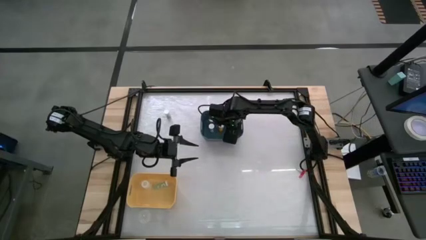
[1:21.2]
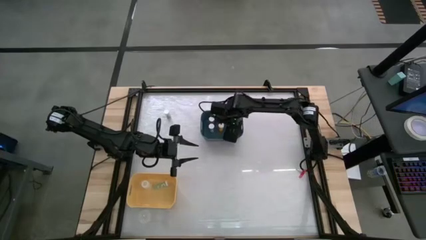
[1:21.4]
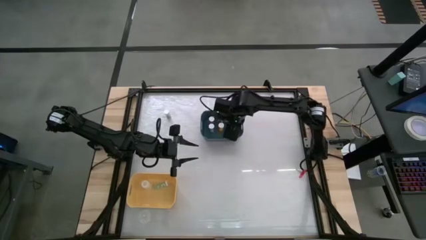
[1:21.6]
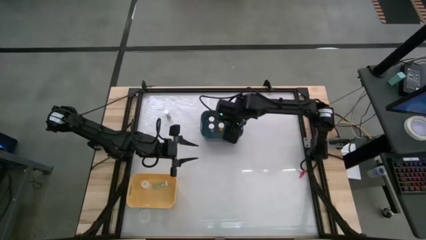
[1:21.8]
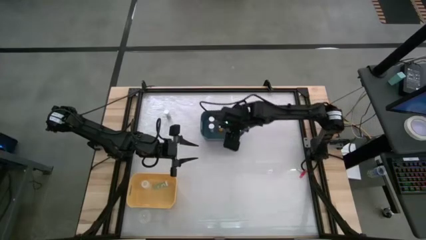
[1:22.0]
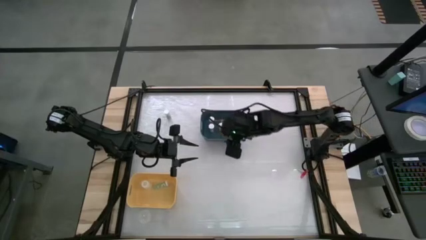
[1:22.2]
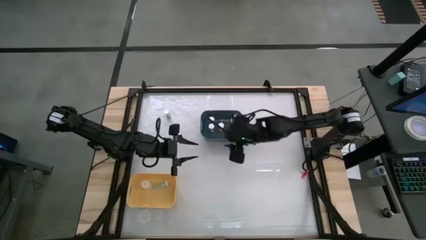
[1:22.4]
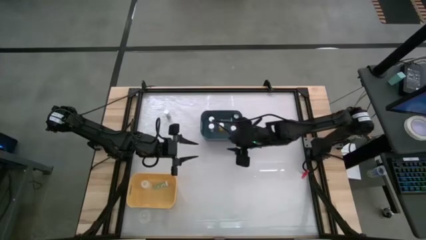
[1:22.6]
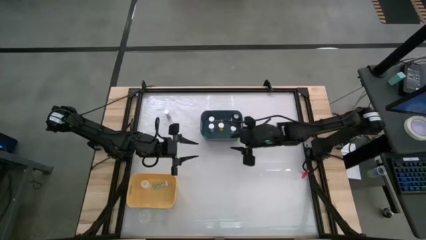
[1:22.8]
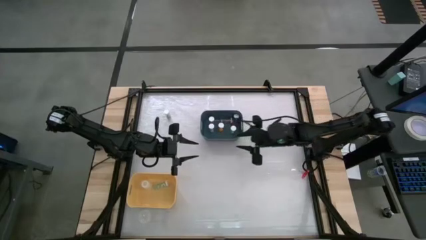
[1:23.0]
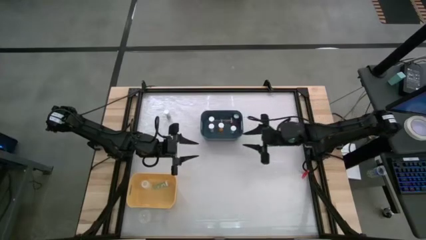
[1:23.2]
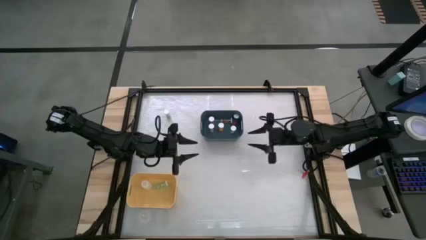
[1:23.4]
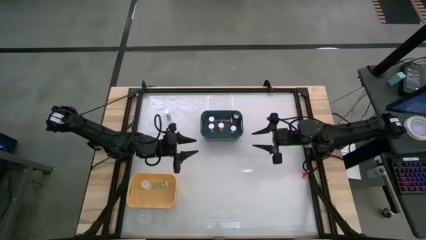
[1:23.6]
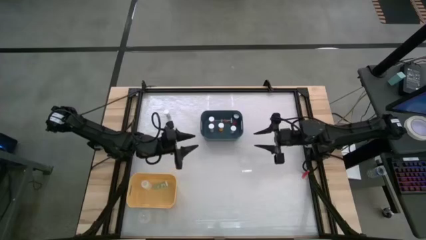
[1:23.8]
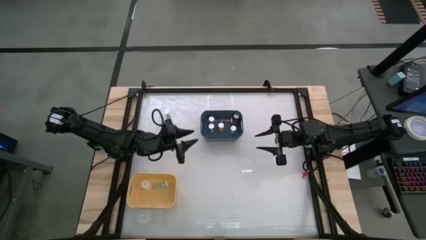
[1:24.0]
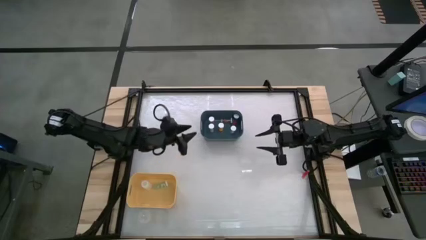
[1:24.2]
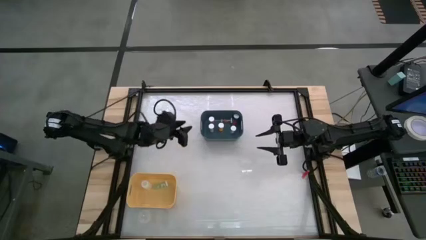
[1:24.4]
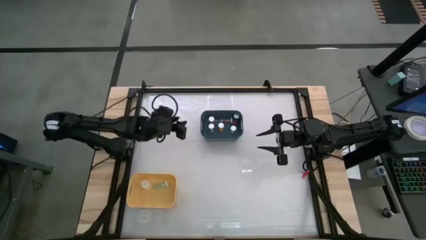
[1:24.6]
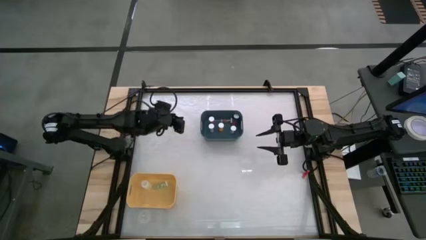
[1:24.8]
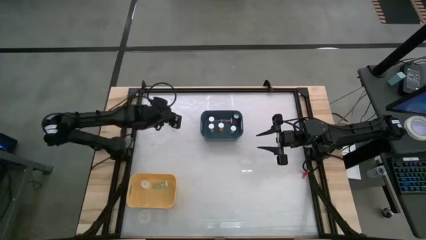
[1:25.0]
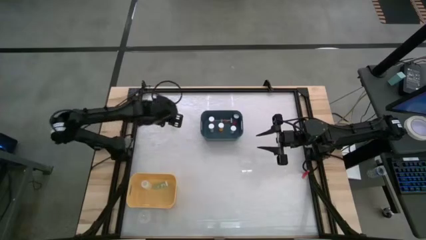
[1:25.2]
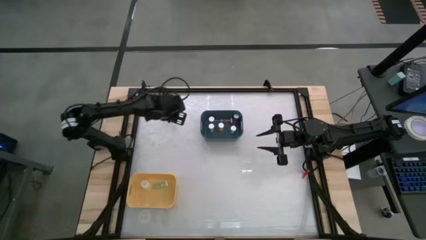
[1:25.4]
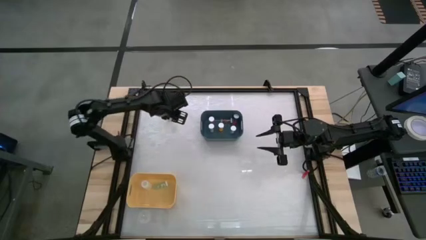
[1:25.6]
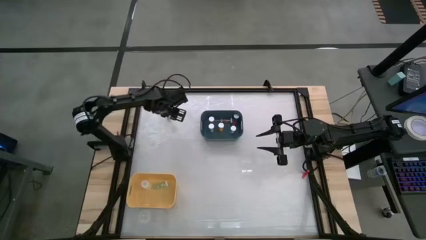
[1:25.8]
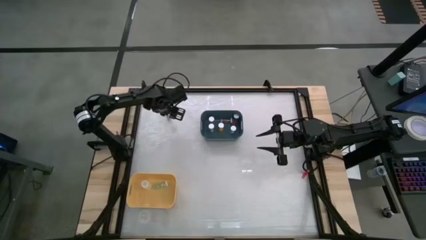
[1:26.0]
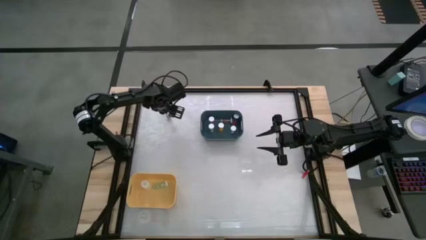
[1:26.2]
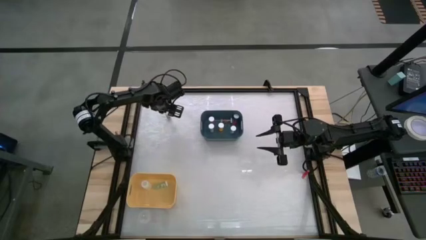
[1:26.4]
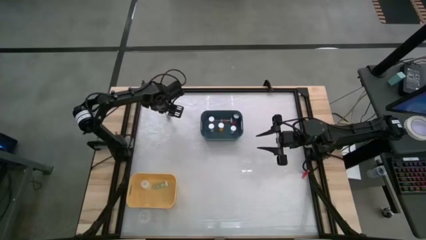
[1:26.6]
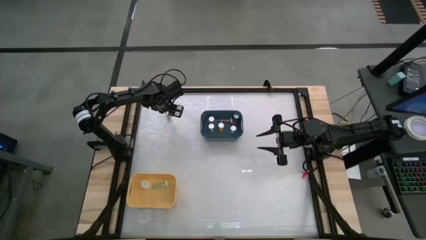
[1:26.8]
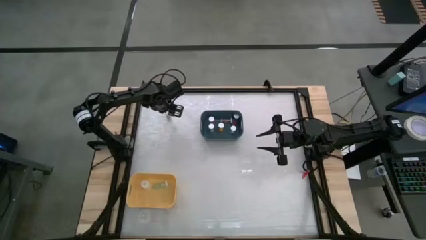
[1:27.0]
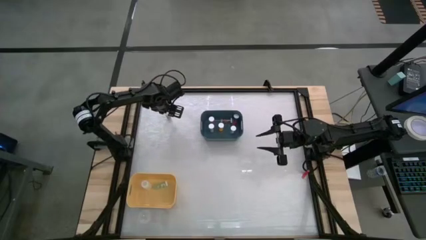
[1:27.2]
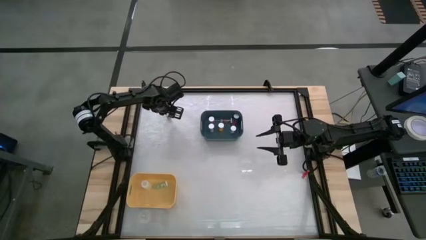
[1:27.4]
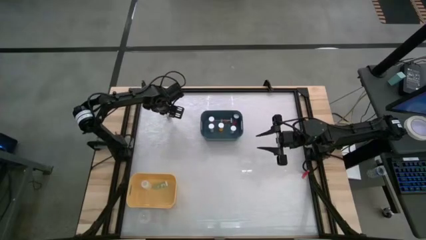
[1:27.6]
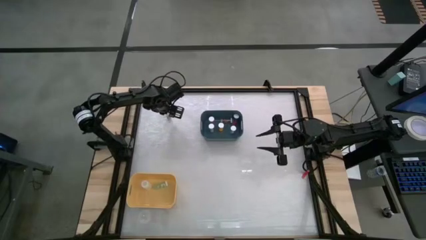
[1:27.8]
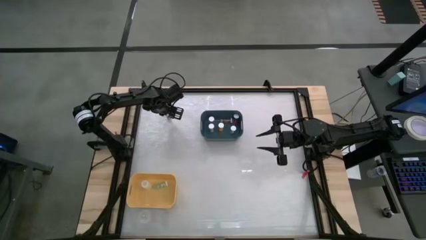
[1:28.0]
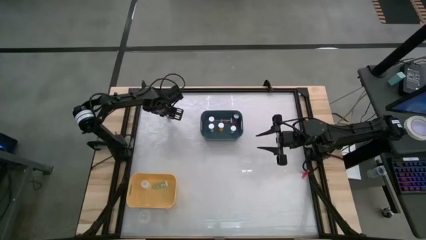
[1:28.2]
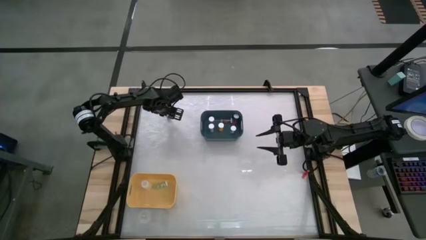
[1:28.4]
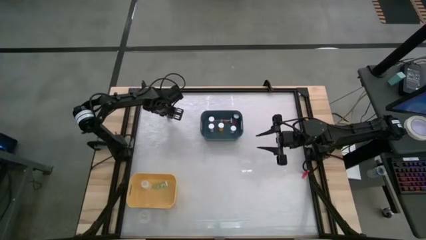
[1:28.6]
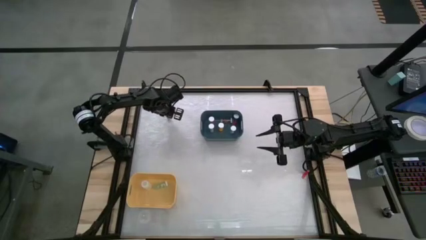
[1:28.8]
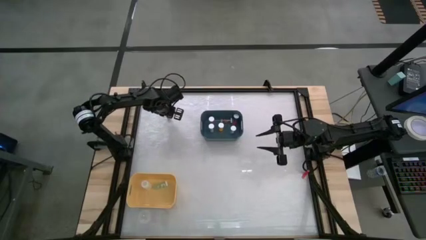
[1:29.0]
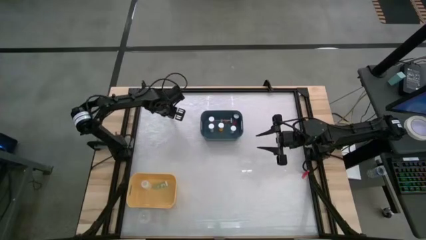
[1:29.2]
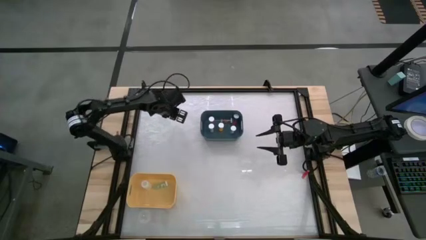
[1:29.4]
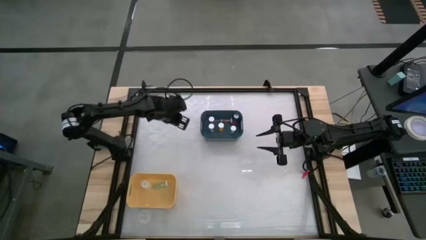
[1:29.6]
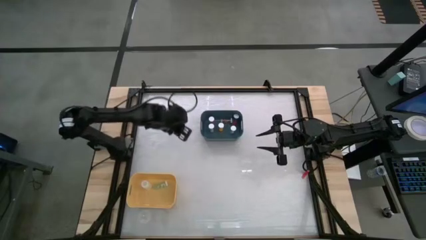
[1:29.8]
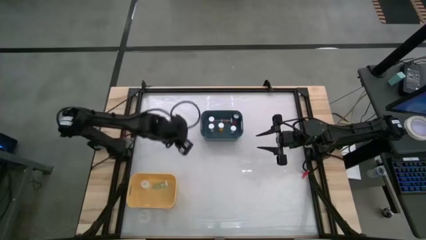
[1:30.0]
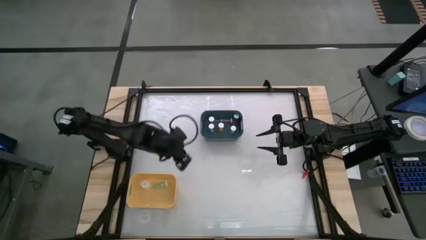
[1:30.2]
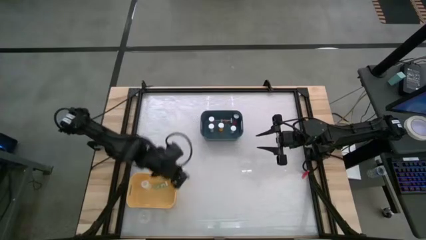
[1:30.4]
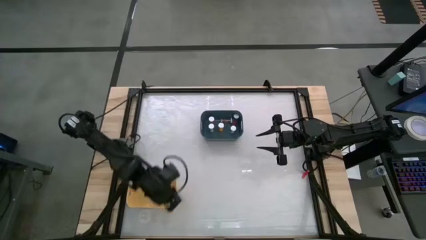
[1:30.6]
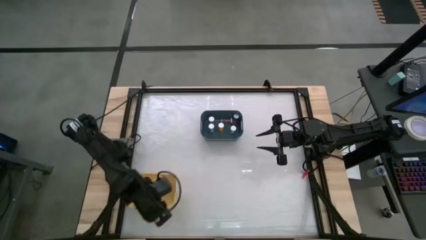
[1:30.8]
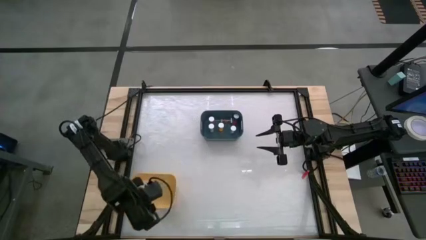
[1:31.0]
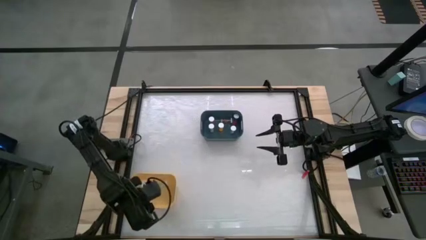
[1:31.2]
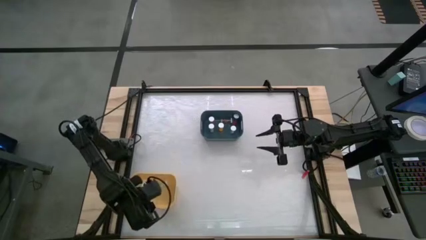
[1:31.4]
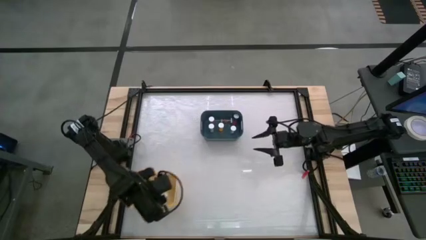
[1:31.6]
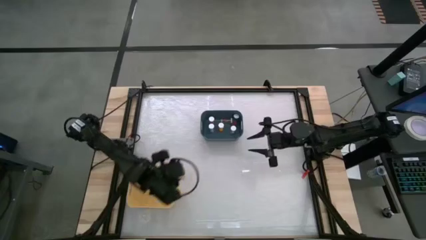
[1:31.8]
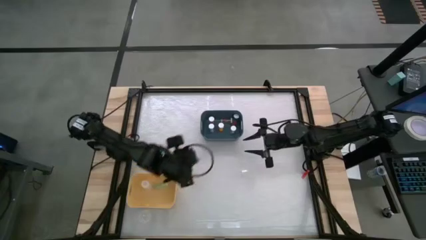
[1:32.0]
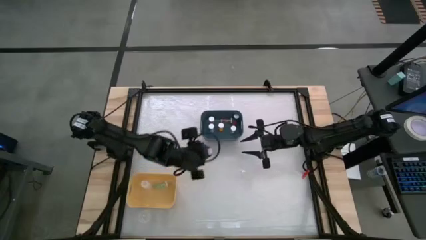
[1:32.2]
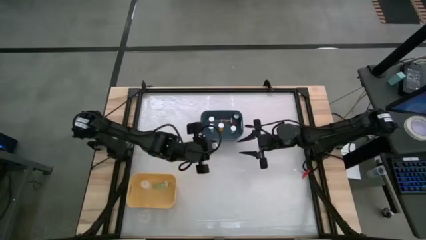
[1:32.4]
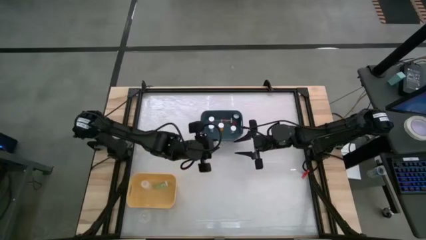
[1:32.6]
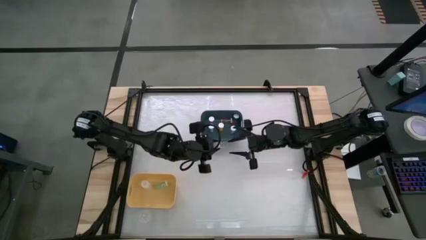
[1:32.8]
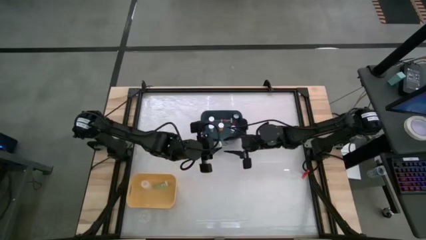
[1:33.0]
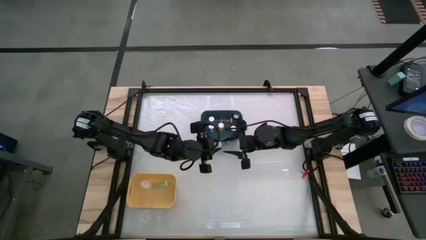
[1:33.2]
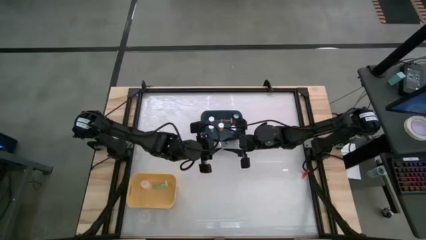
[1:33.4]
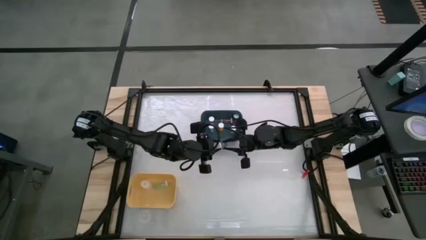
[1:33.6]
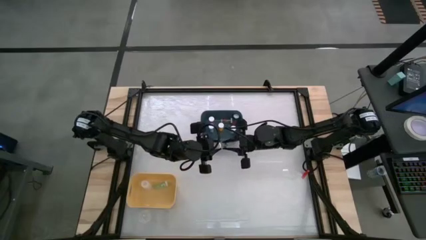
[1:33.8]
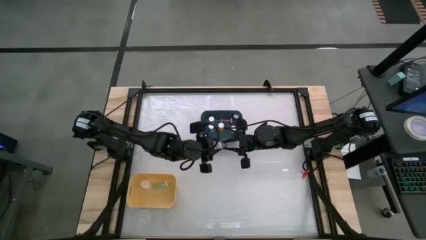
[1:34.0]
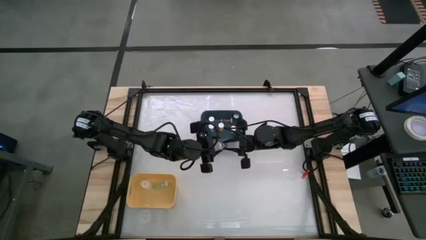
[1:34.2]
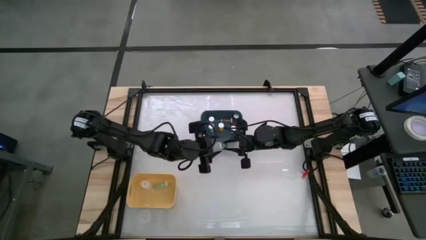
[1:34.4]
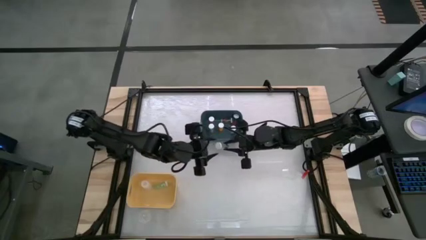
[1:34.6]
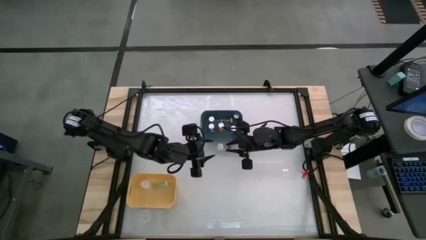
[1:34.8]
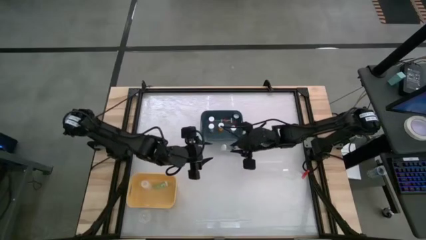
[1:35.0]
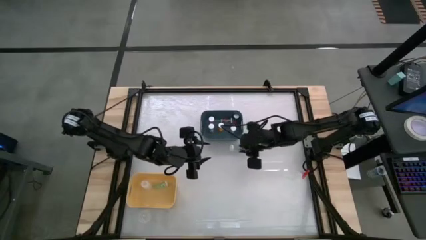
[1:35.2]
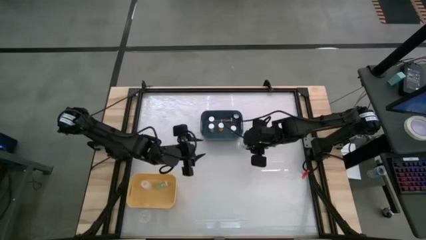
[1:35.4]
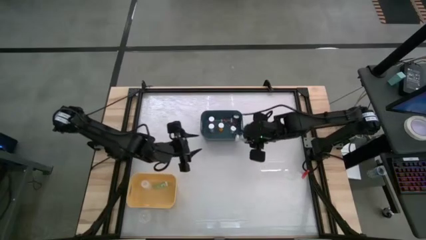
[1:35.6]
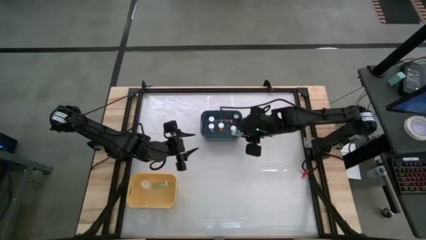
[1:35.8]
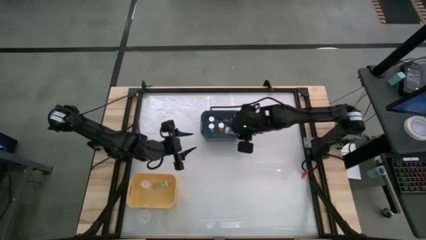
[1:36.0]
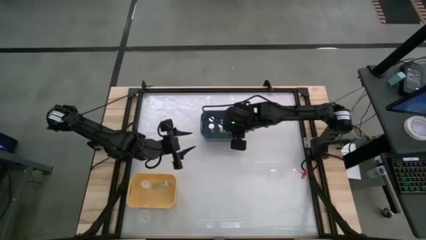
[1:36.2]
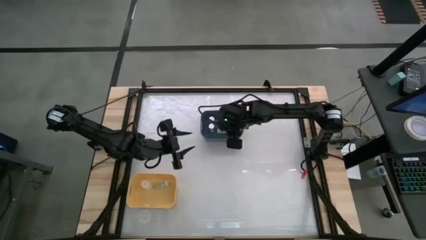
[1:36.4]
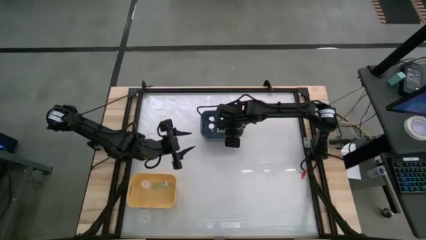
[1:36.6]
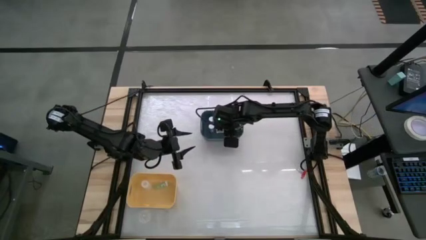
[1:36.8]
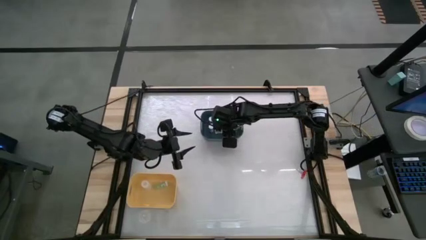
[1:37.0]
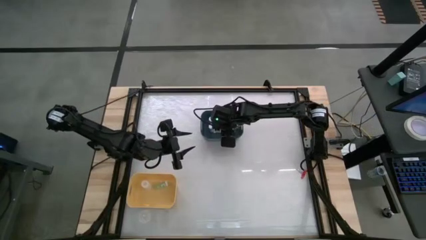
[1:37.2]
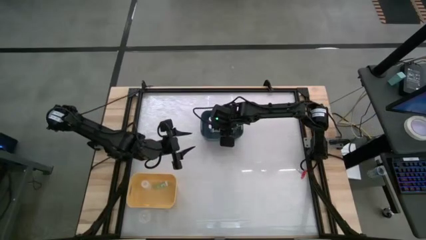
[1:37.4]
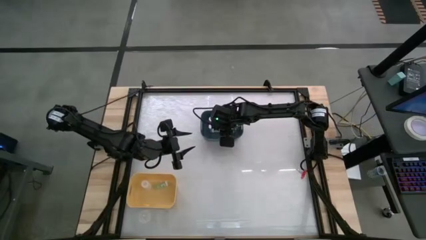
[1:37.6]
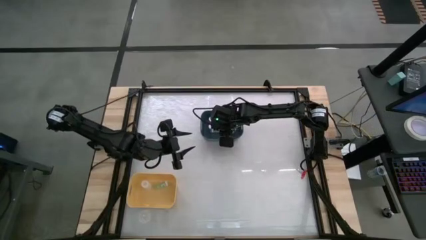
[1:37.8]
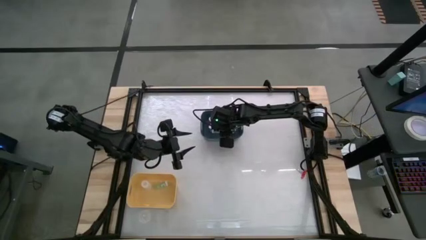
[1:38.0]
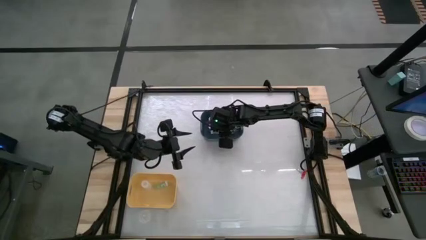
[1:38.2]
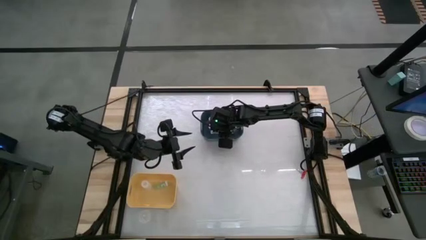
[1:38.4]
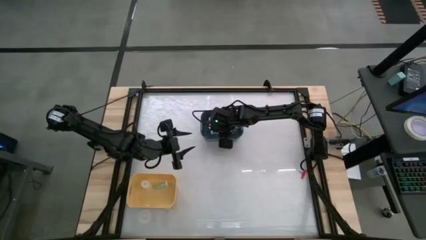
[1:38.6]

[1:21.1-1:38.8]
Task: Pick and place medicine bottles into bin by pill shape (circle, oval)
Put the green capsule bottle into the blue bin
